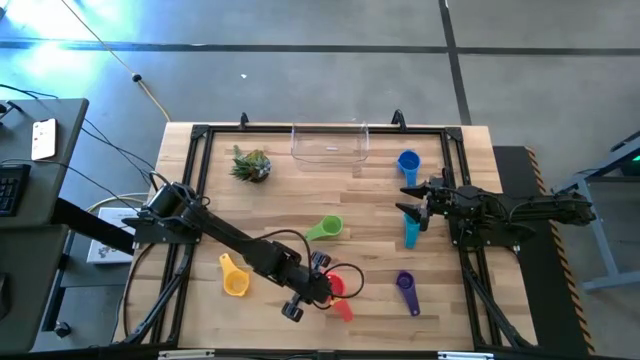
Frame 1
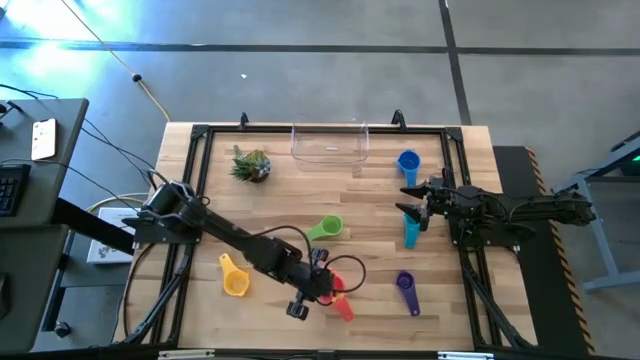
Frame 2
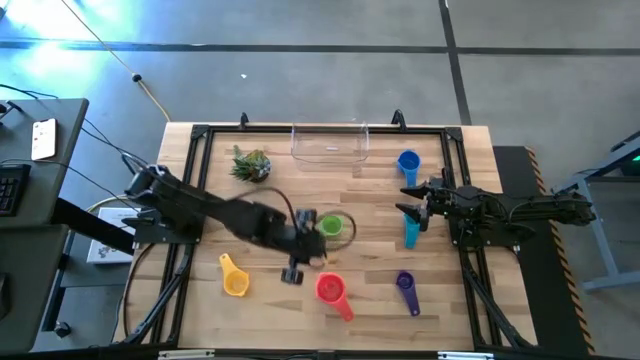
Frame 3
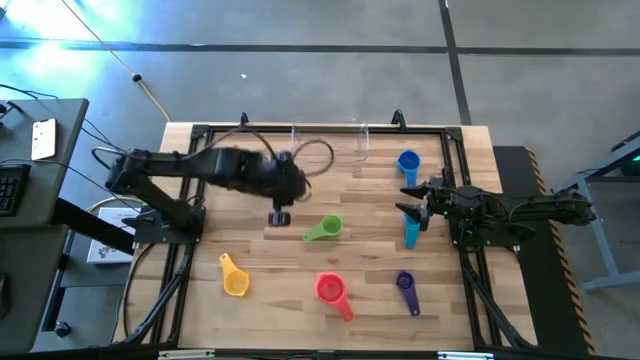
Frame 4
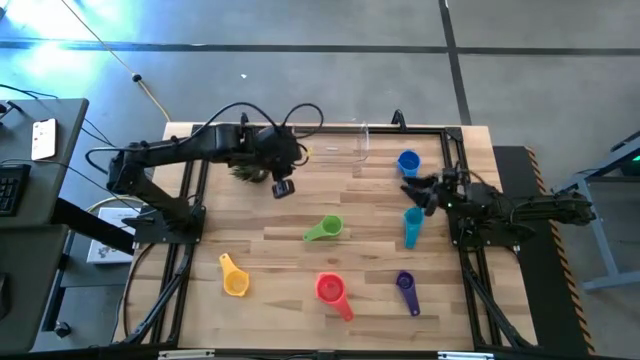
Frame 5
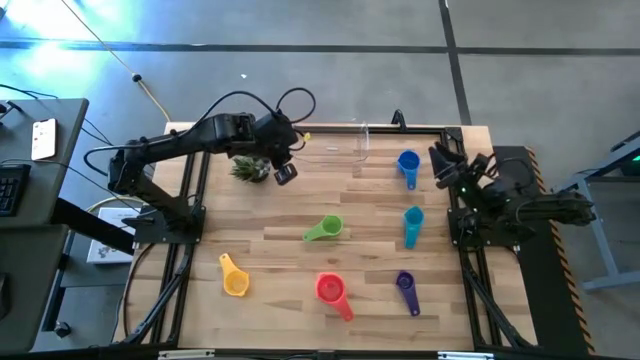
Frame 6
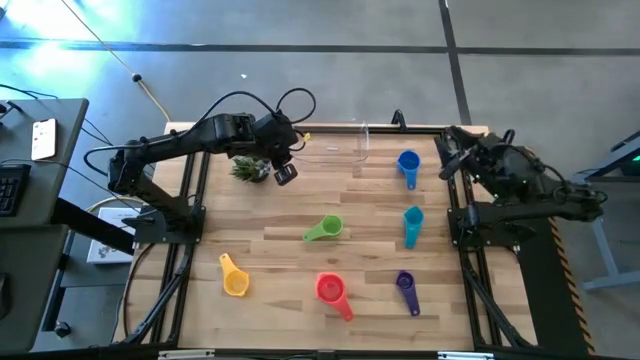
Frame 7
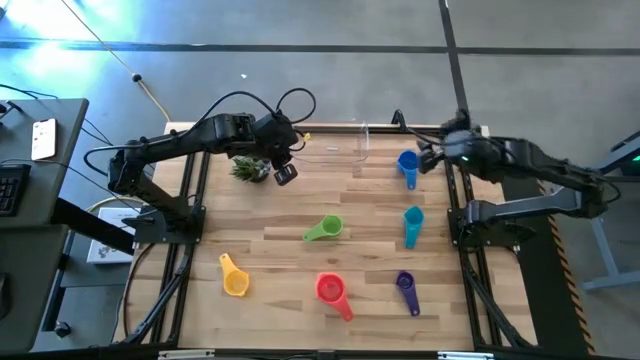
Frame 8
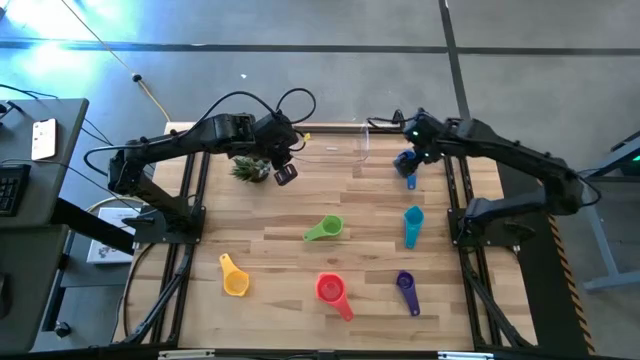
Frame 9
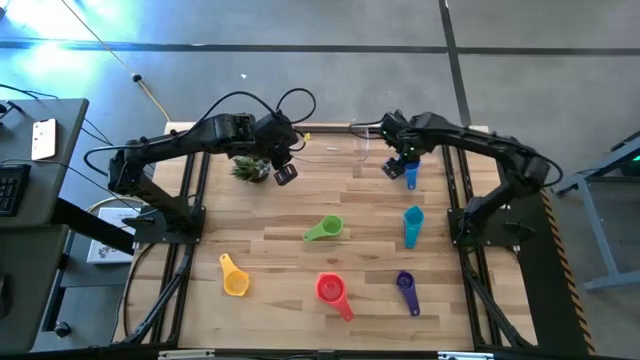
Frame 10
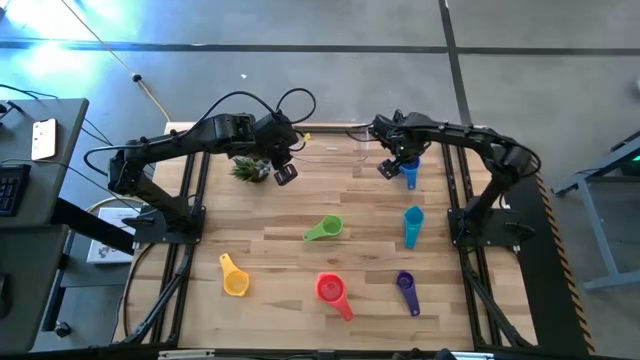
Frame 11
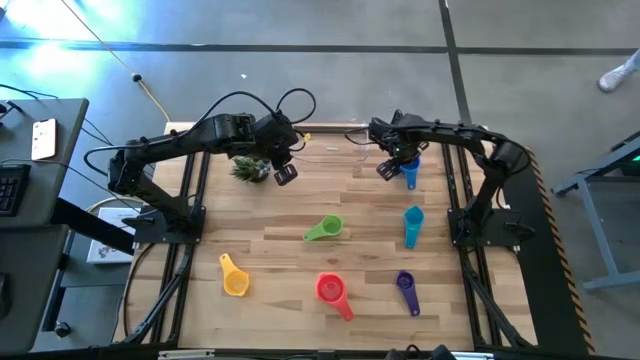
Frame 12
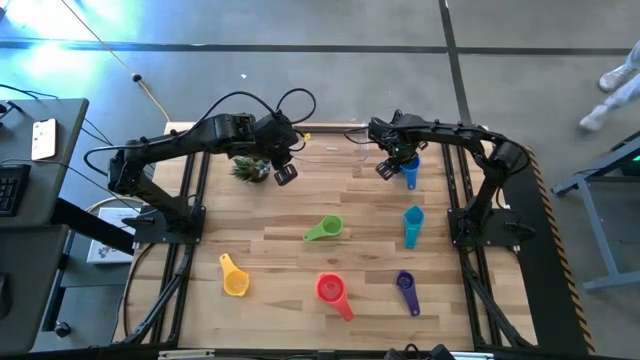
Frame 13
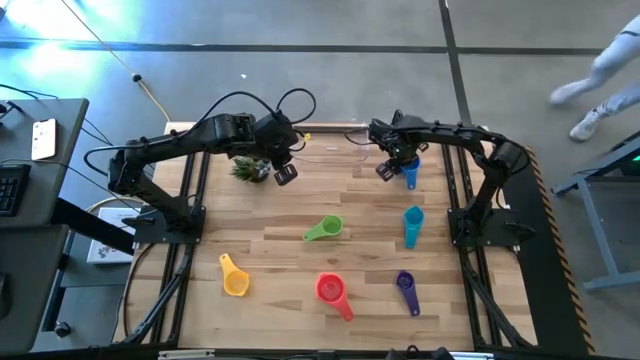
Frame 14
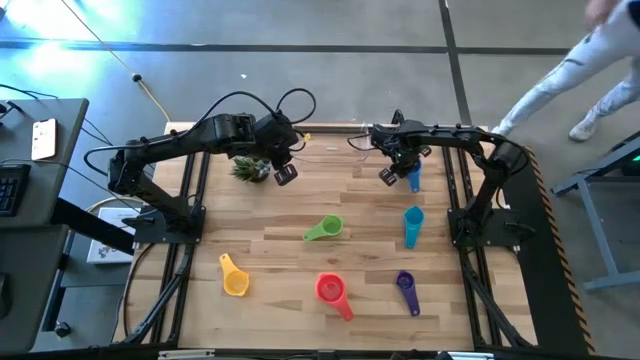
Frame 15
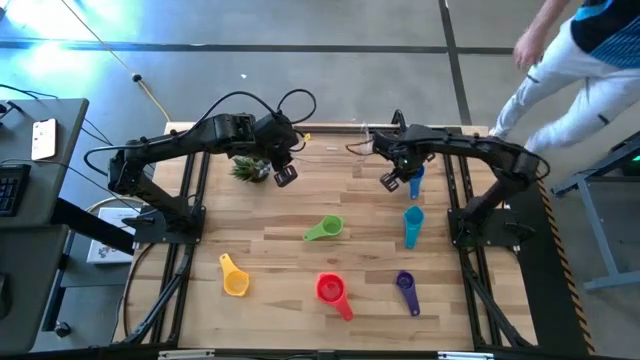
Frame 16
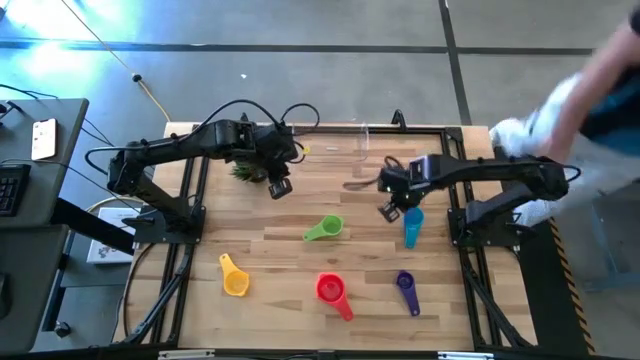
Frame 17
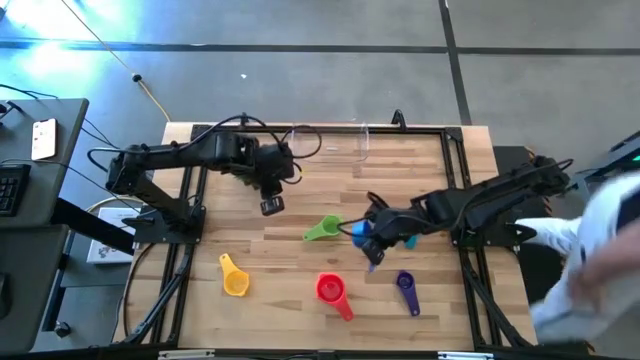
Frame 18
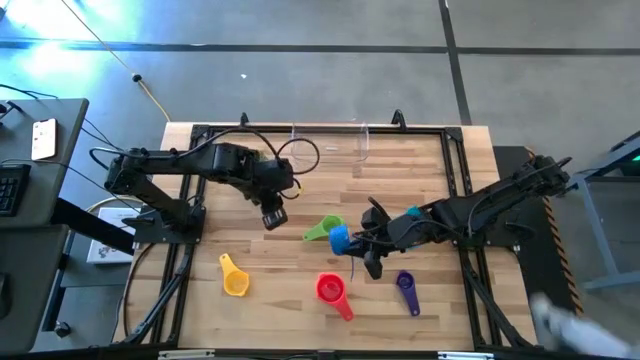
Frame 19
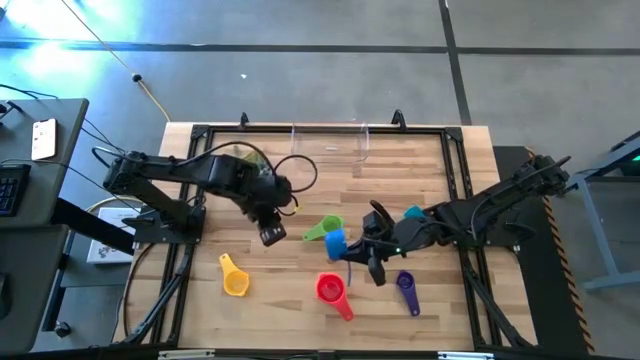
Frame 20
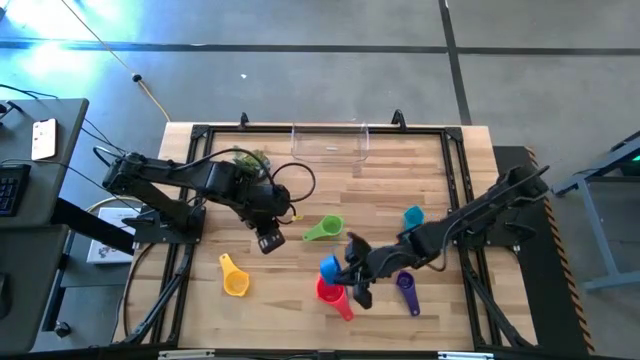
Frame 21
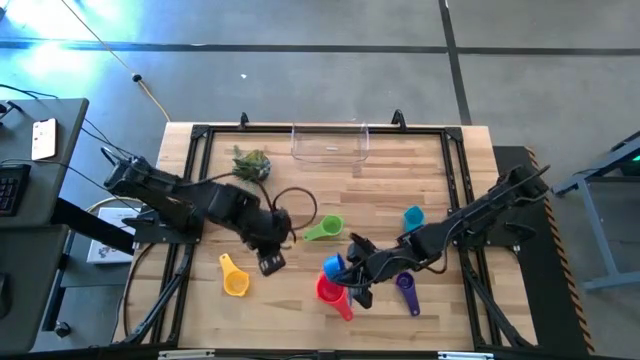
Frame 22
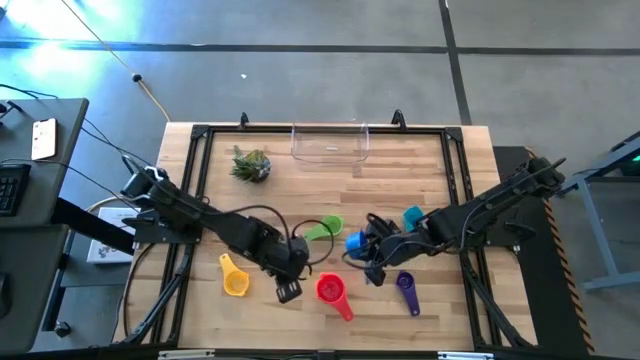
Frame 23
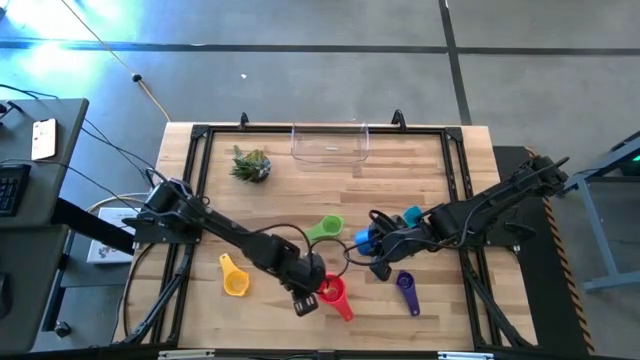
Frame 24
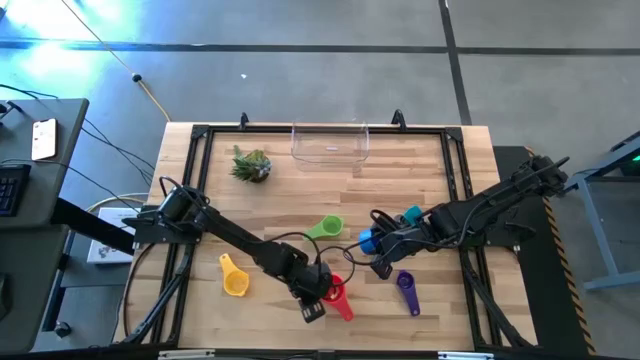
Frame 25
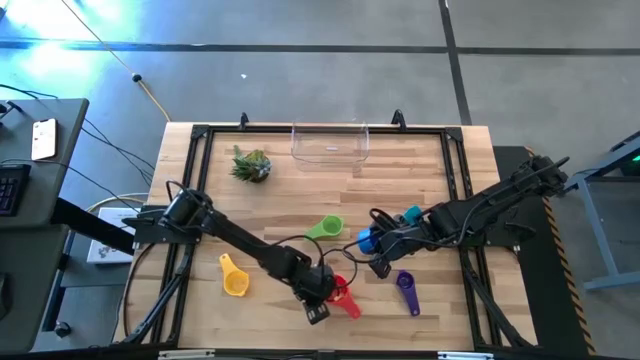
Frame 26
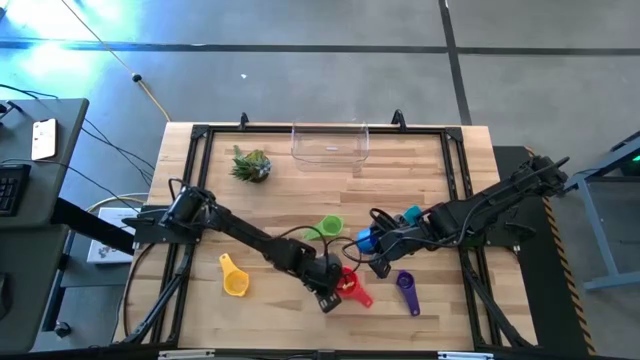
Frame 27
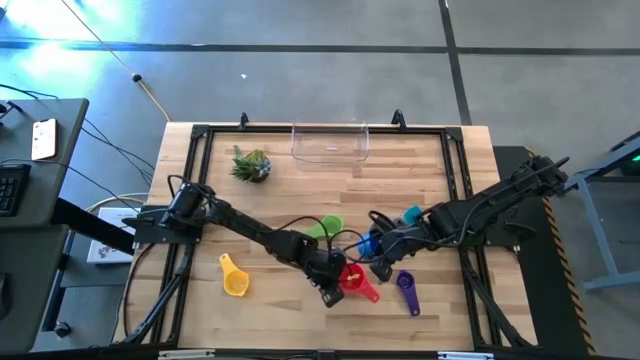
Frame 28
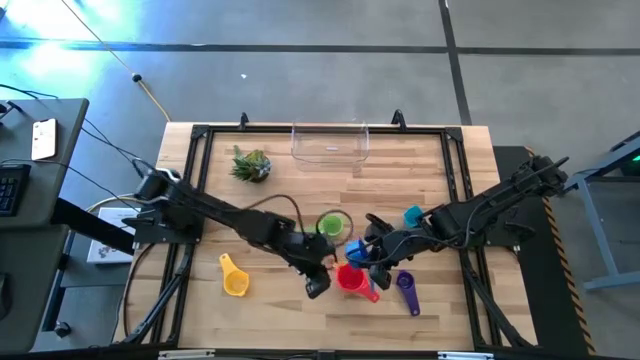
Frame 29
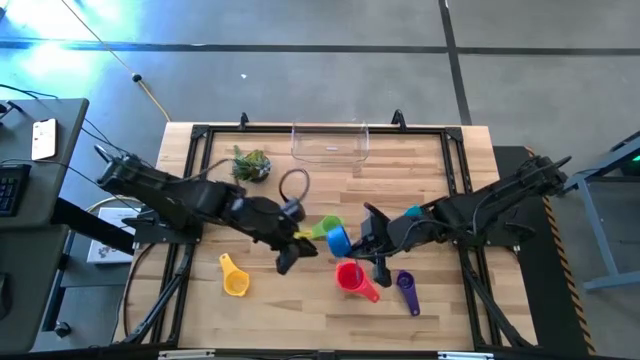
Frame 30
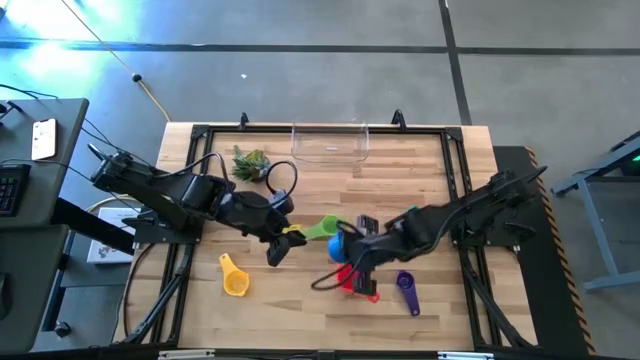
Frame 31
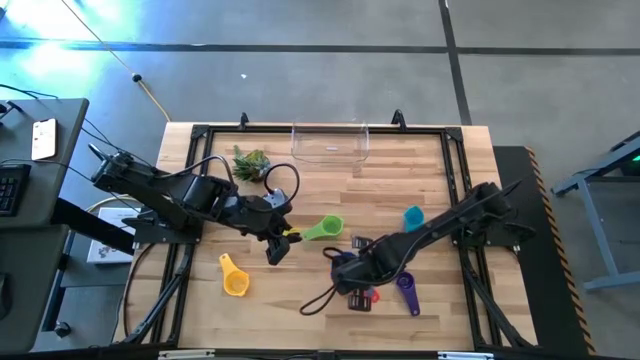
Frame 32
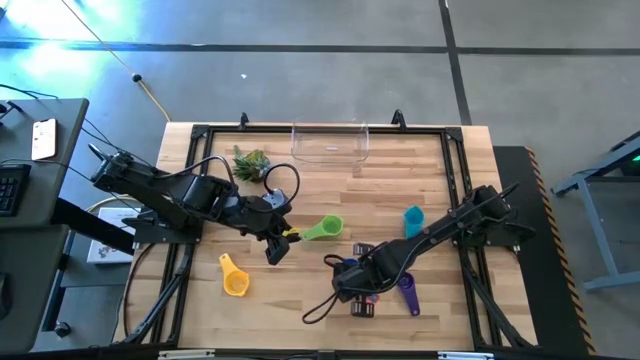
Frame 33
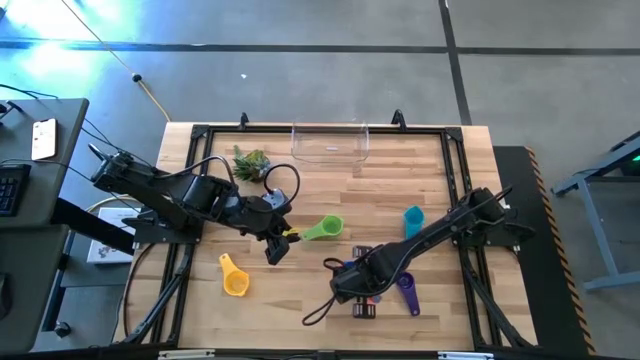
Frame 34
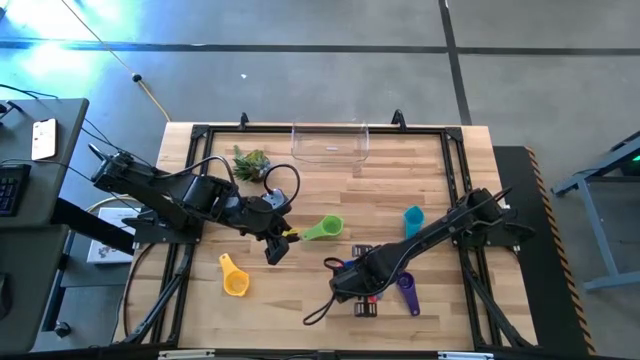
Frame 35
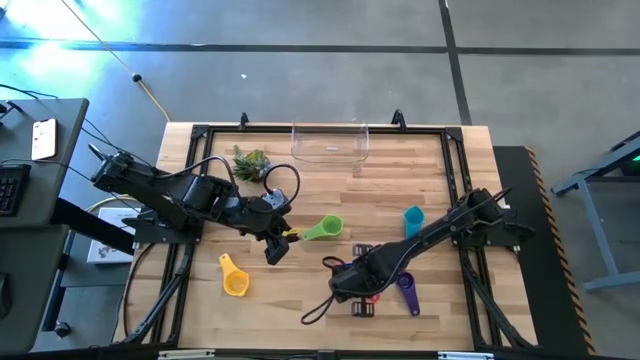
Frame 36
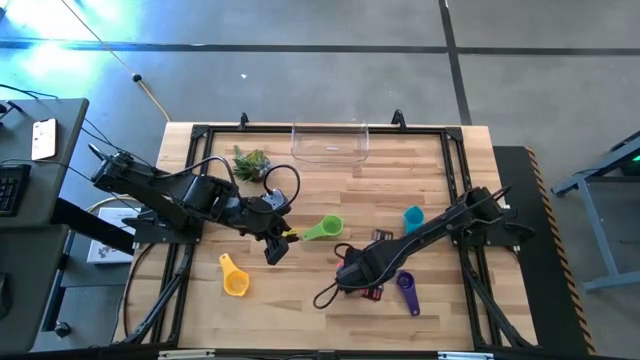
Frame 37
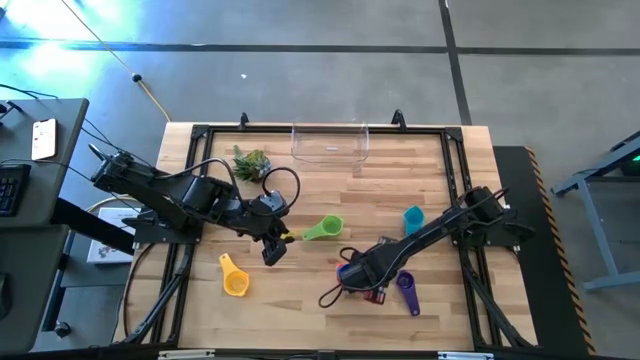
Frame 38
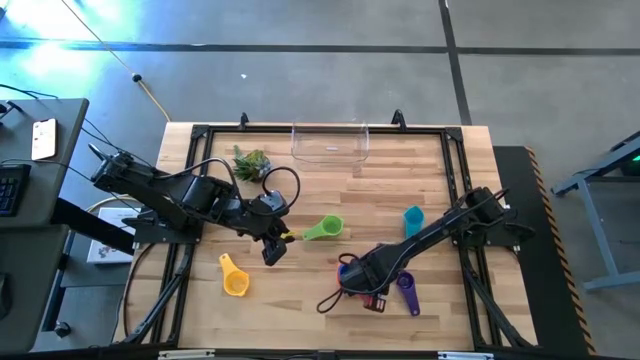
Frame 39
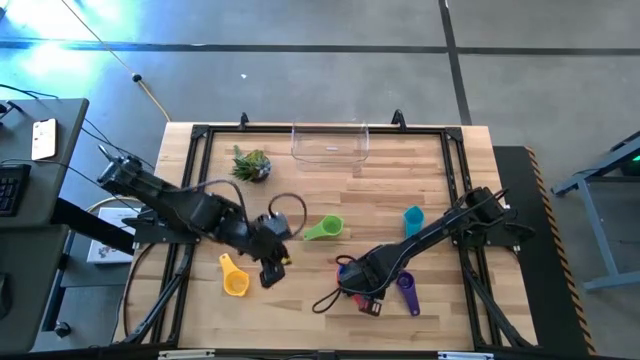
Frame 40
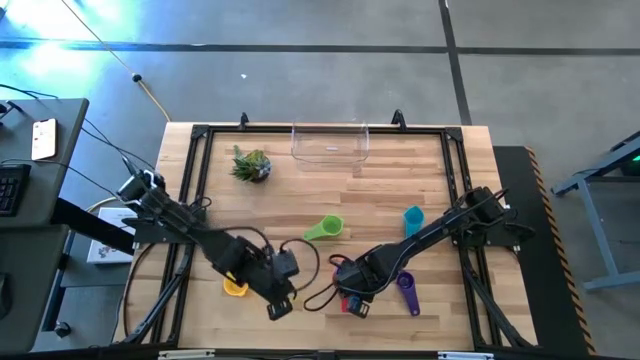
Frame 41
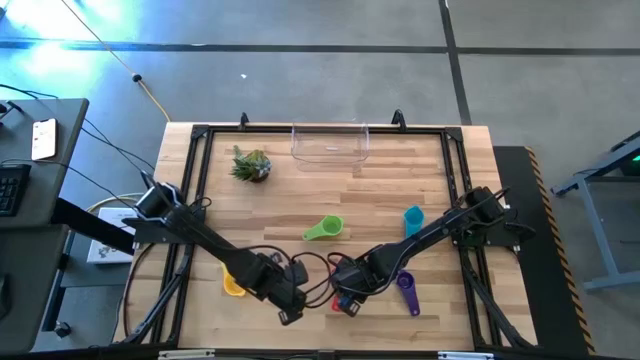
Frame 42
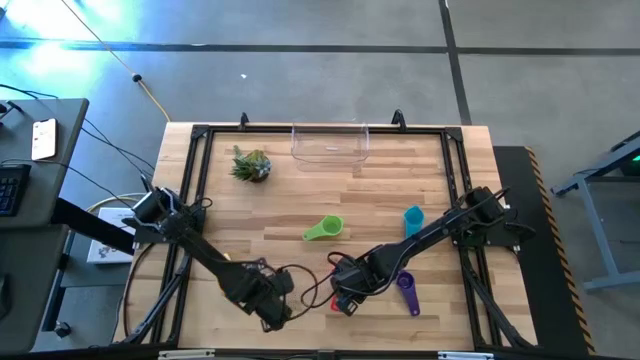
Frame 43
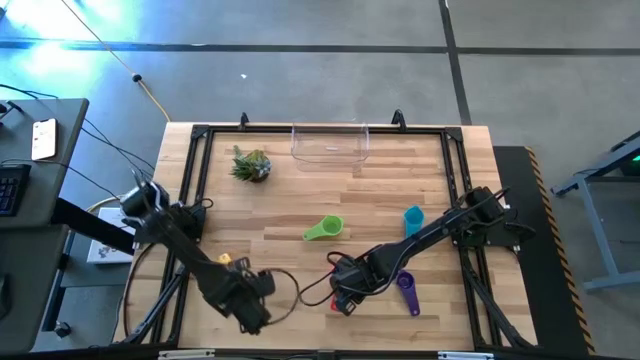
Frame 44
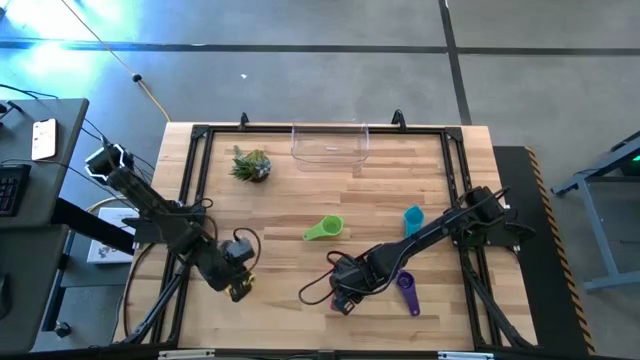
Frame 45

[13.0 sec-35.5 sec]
Task: Nest measuring cups in basket
Stack the blue measuring cup into the red measuring cup
